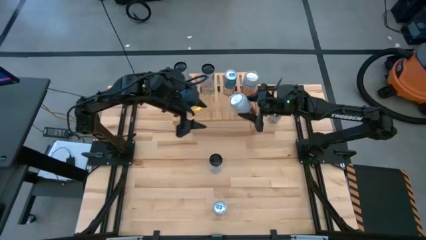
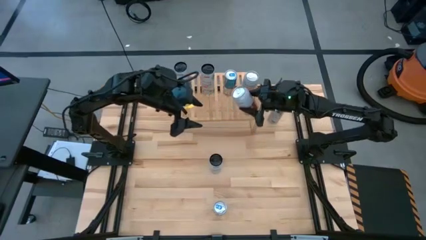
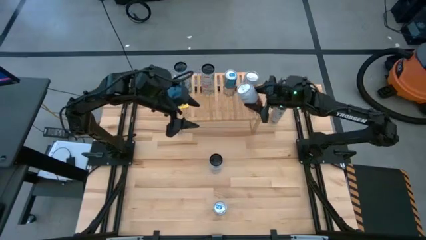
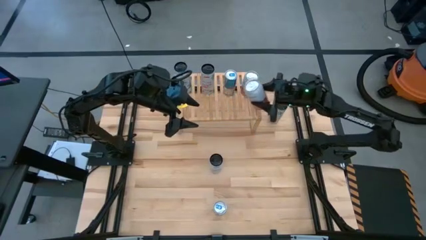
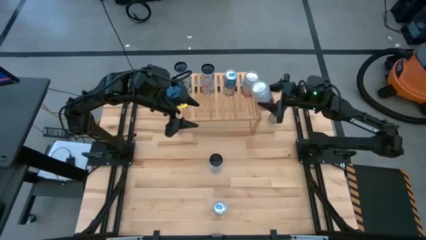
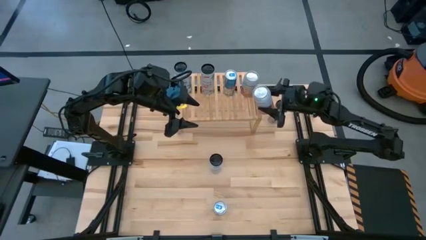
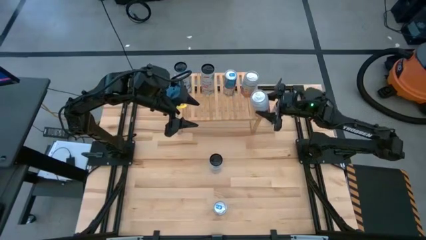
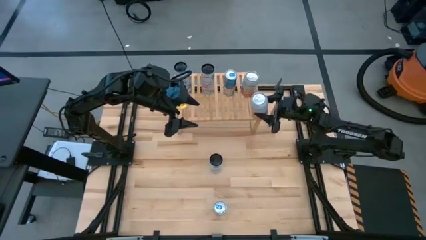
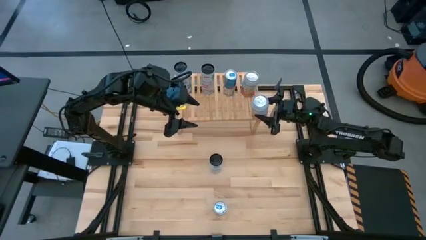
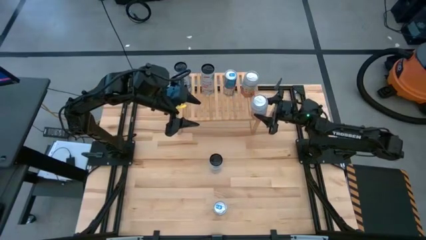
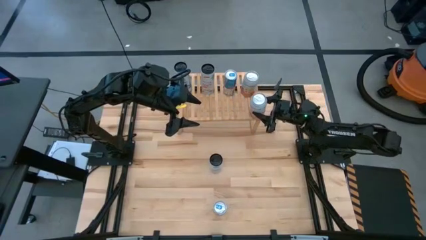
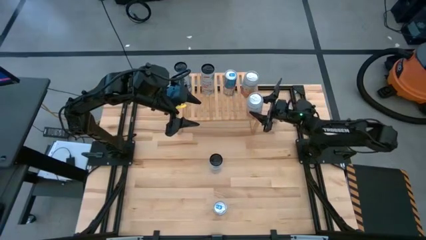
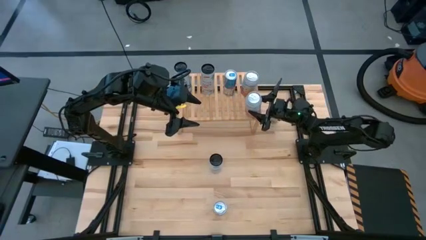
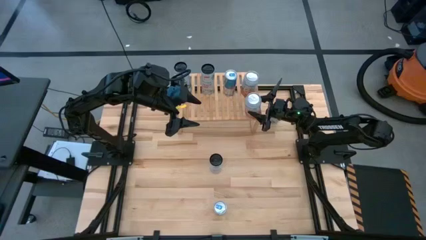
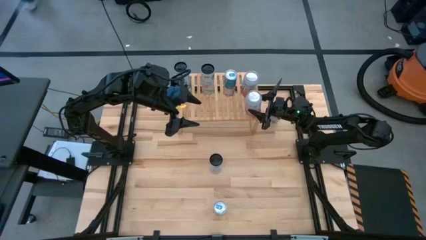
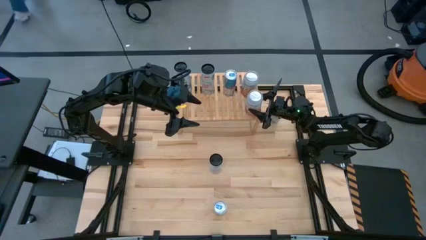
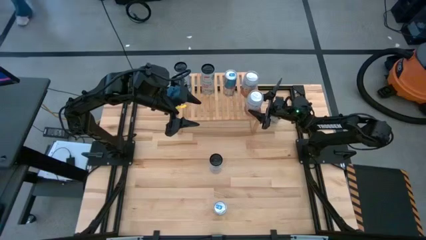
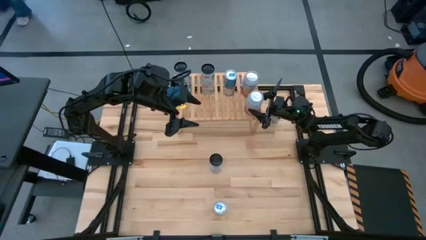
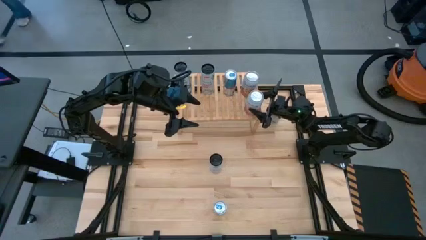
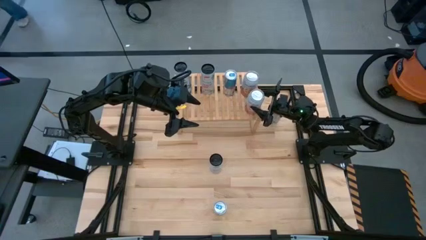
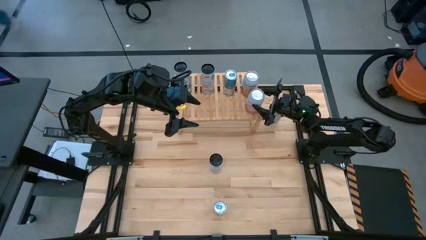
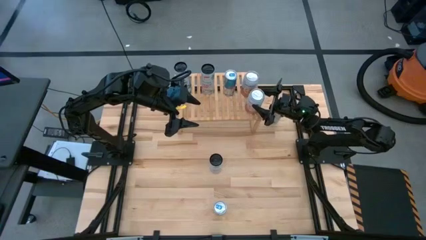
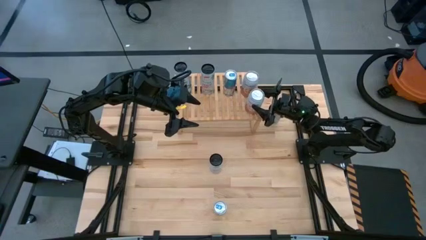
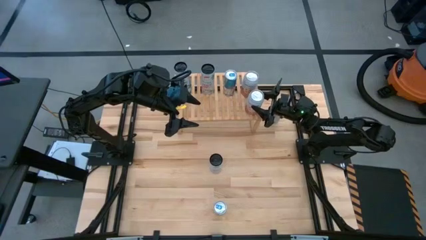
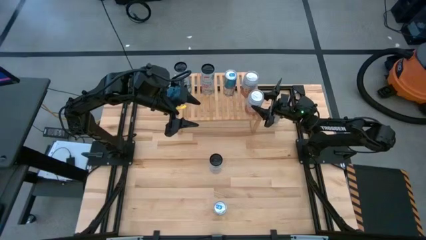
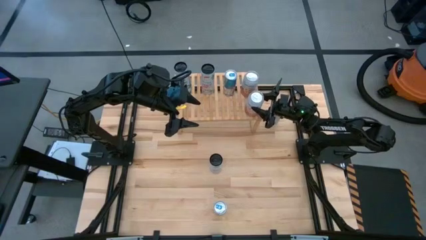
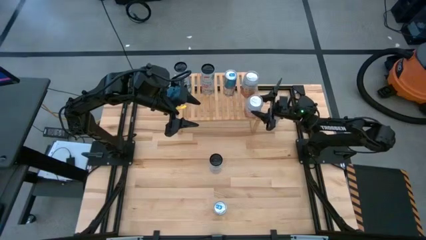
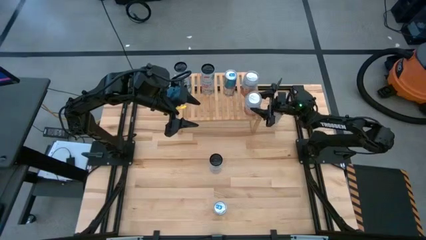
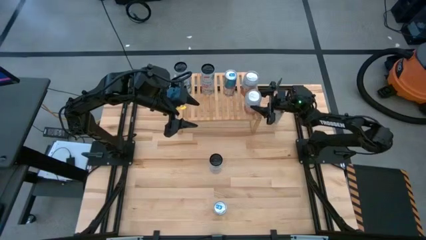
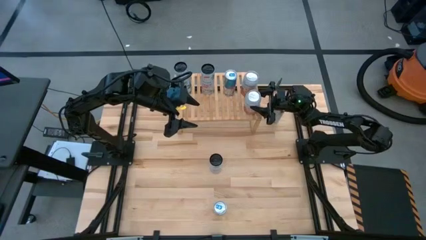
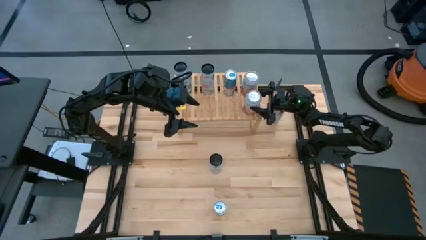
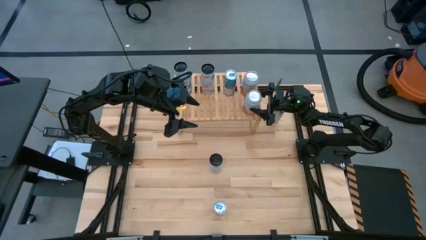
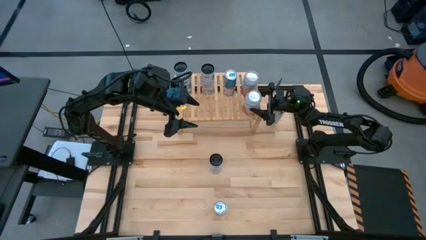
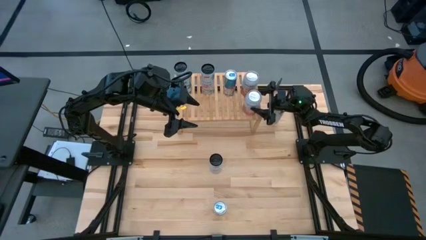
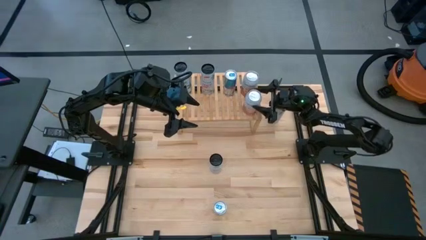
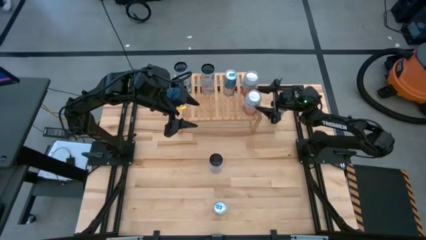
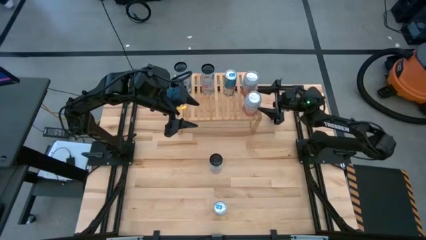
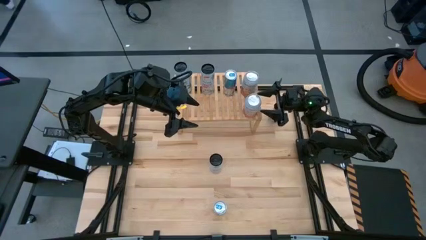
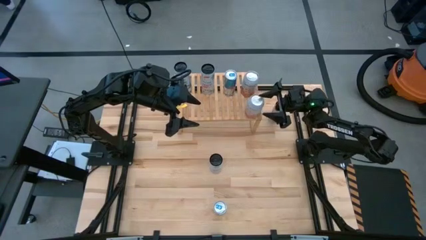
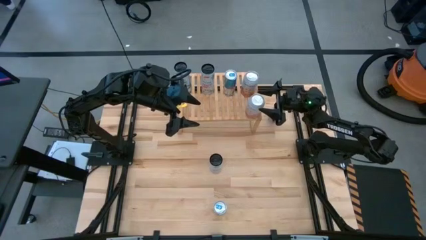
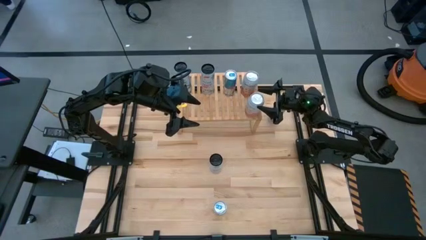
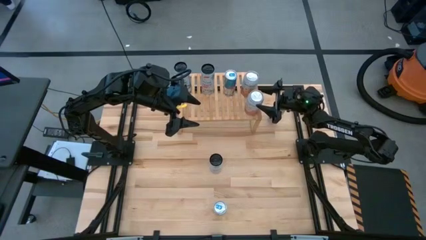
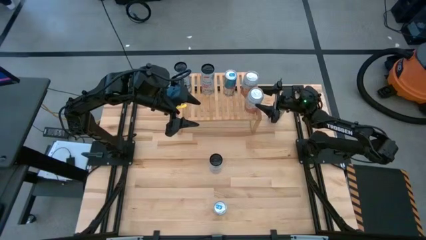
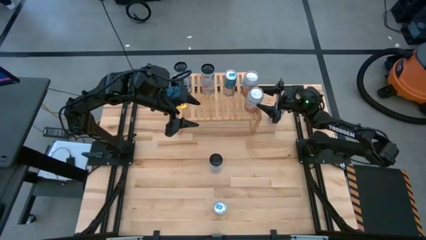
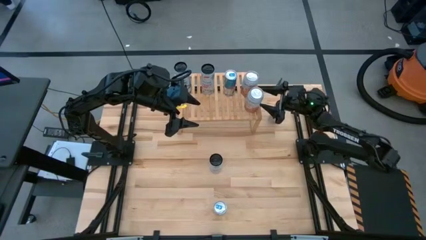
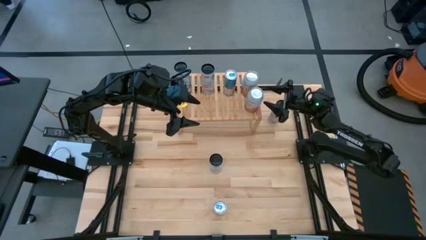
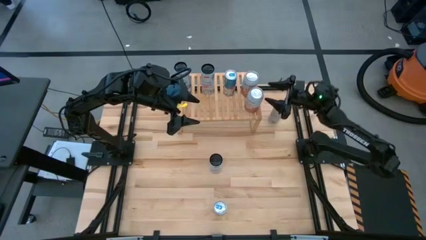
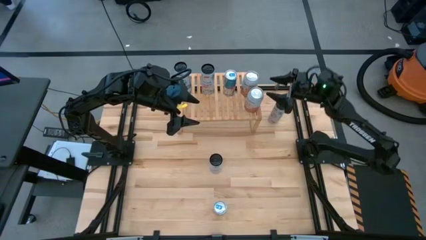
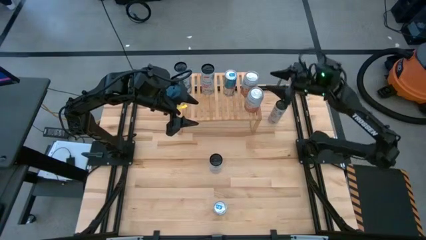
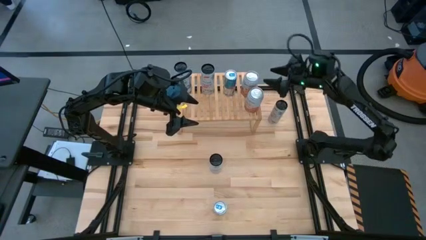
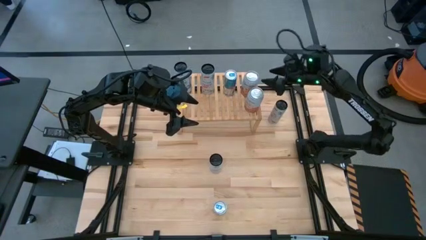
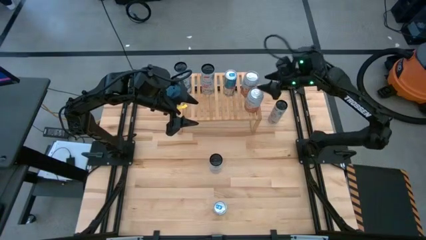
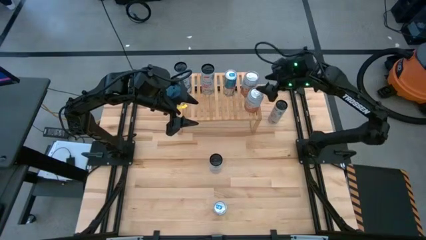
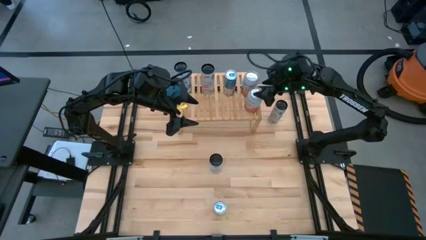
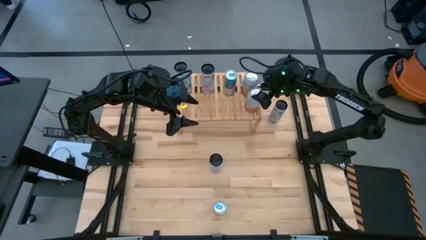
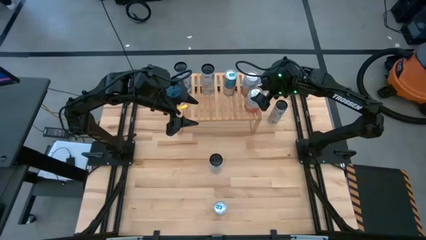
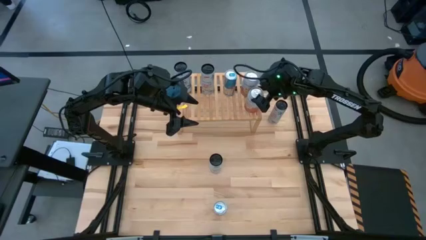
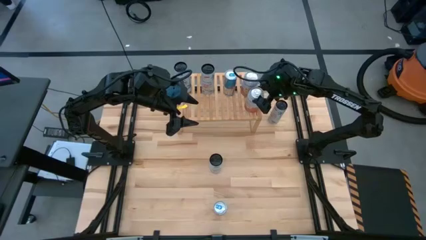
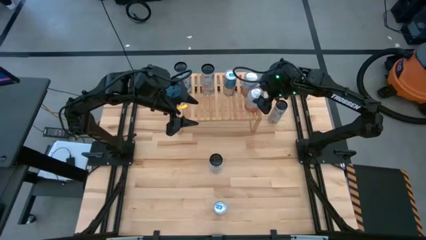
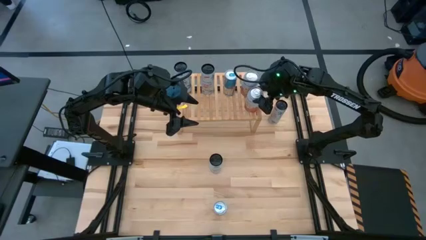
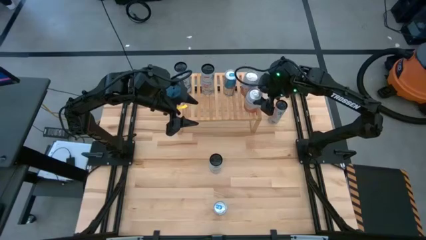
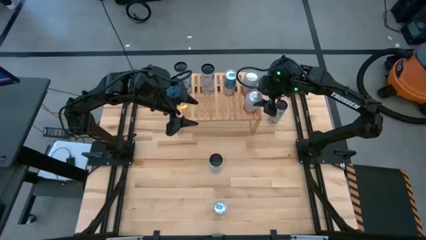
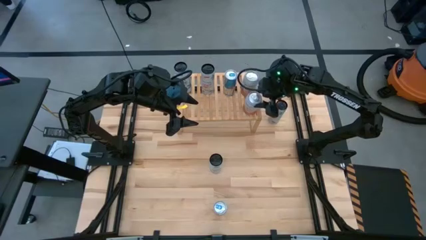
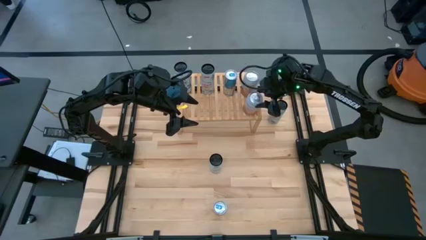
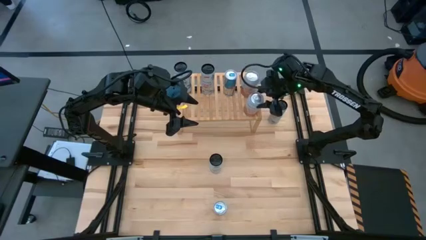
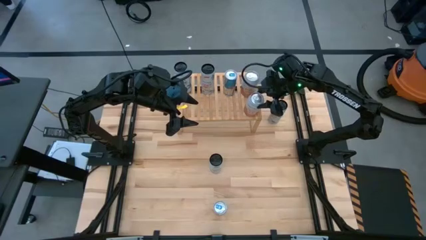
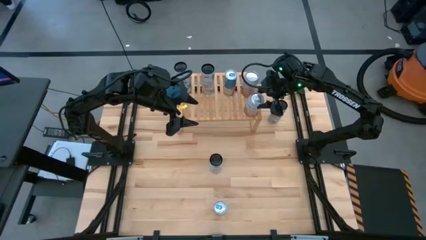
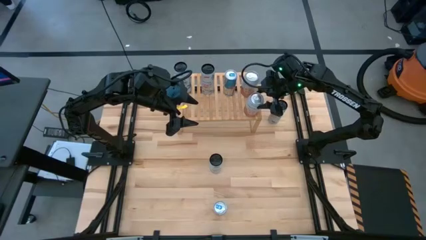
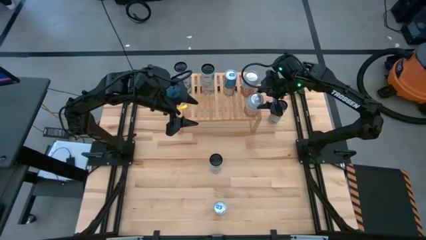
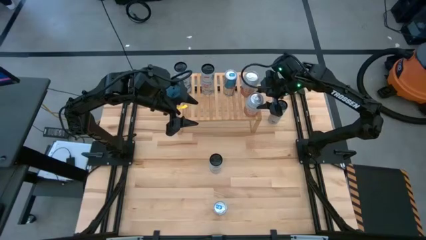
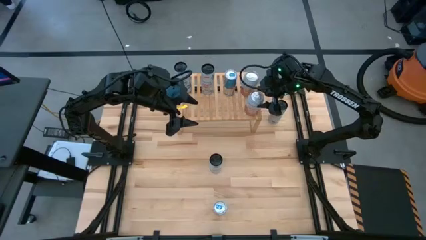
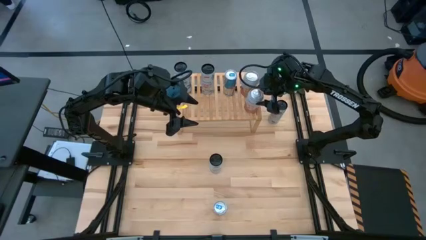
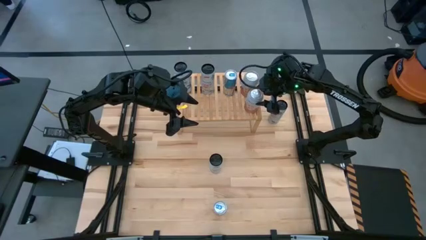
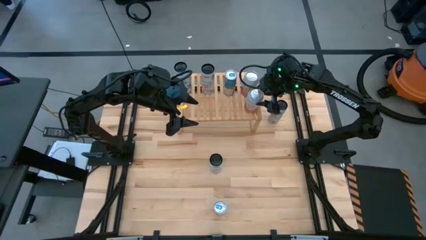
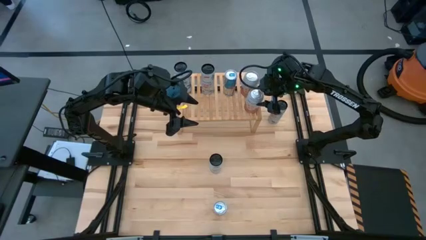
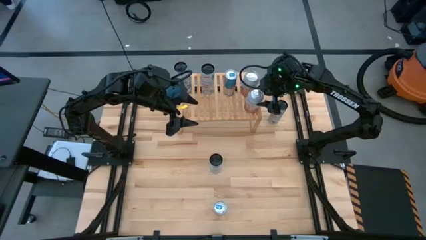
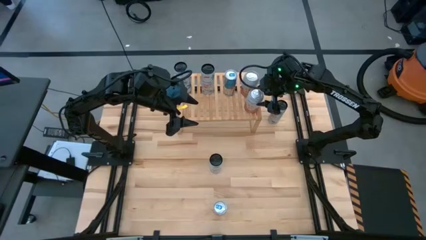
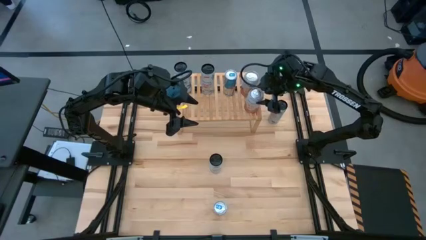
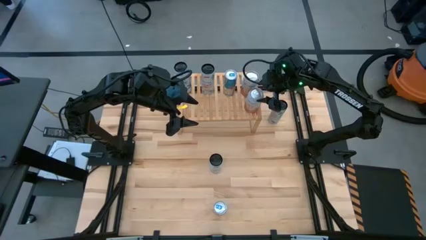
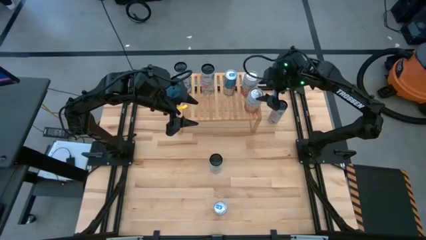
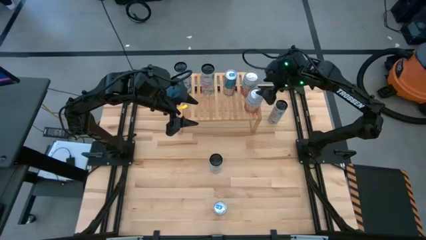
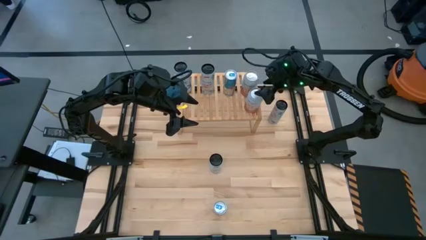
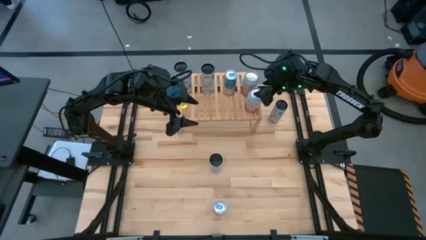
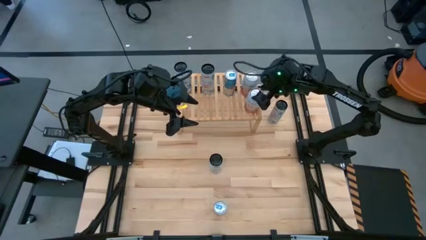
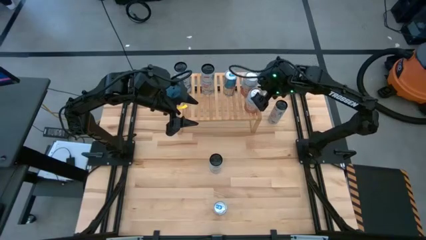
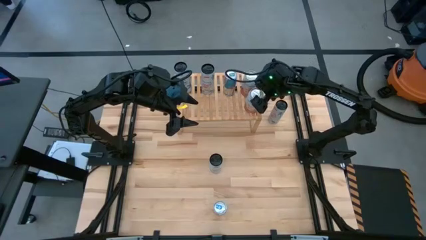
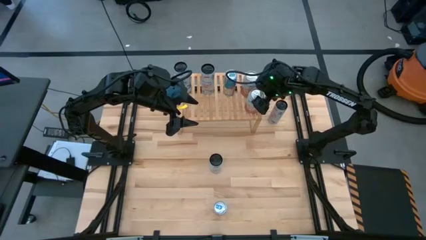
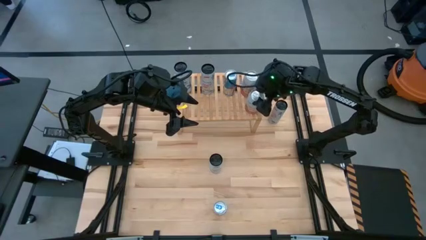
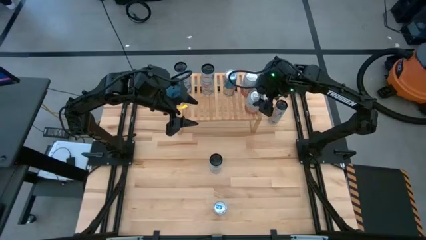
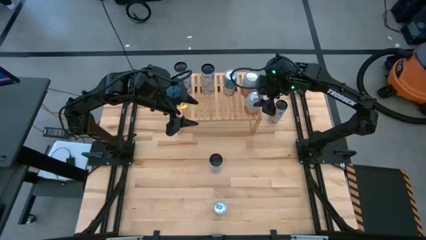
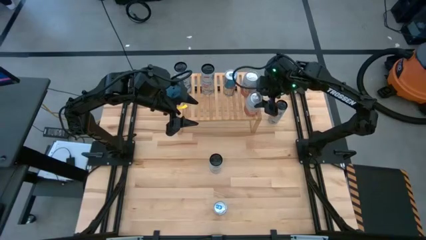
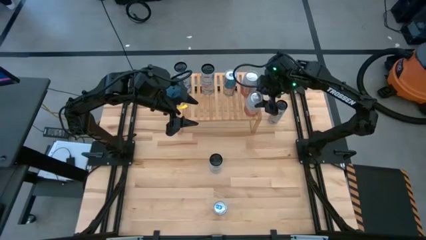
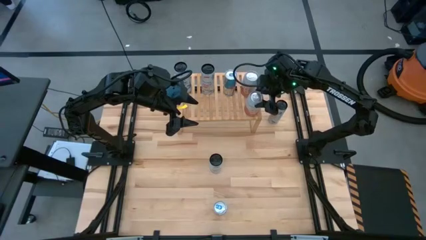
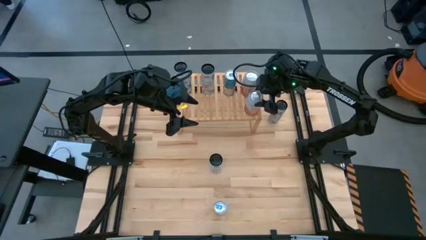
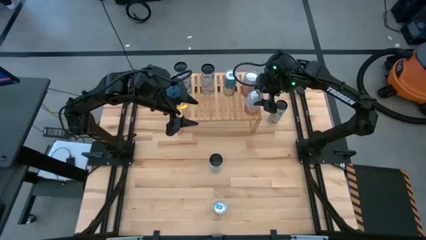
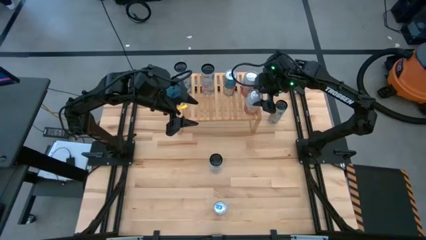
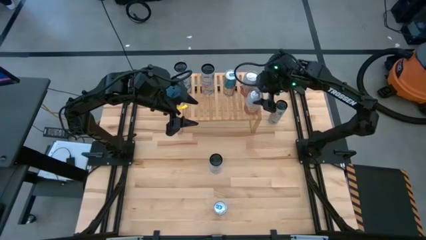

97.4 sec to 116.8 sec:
Task: Place canned beverage on shelf
Put the pink-white soda can on the shelf aligned with the other pink-white soda can
